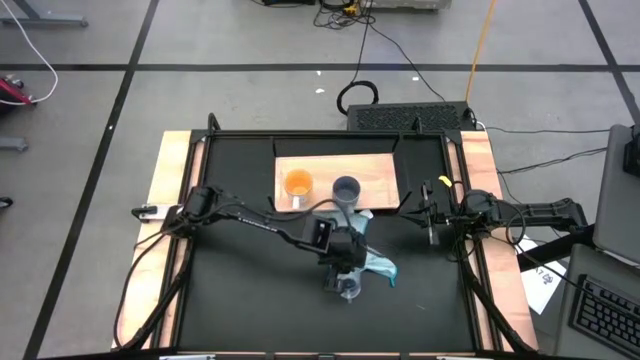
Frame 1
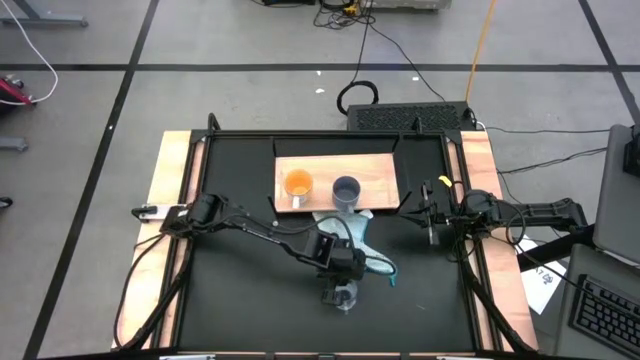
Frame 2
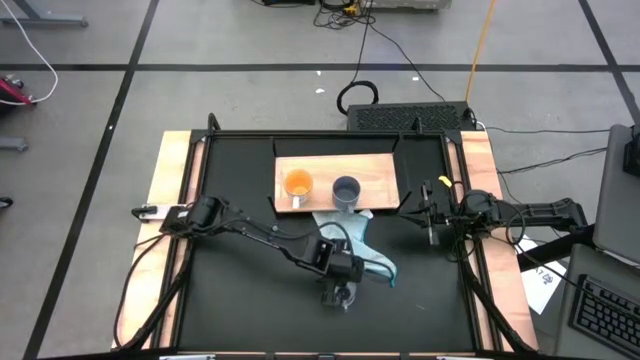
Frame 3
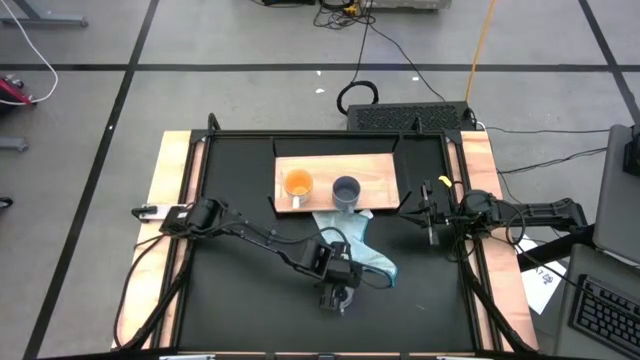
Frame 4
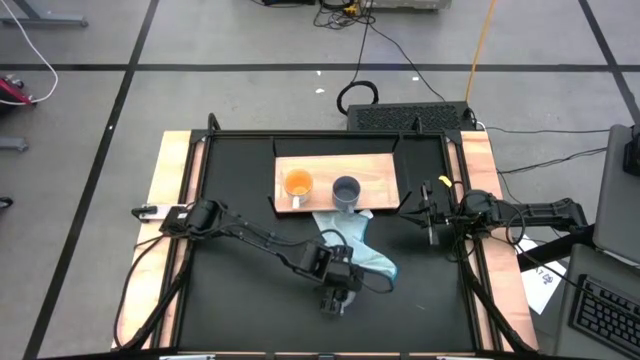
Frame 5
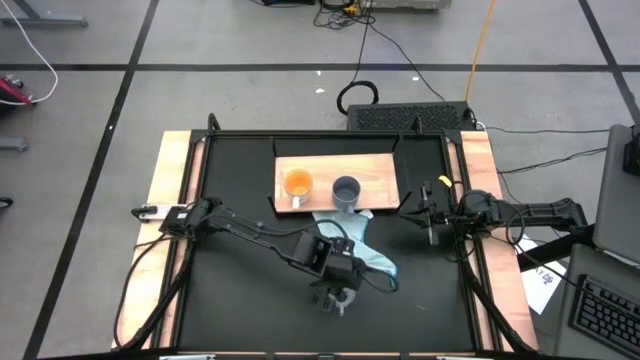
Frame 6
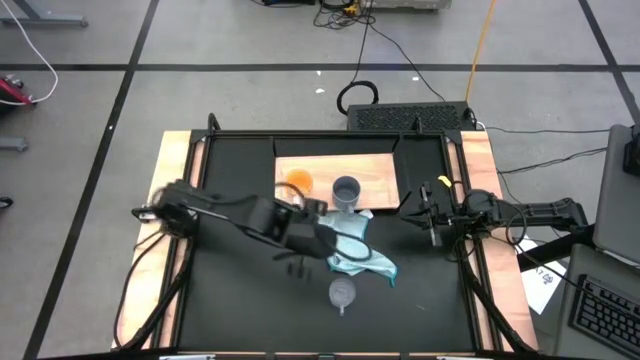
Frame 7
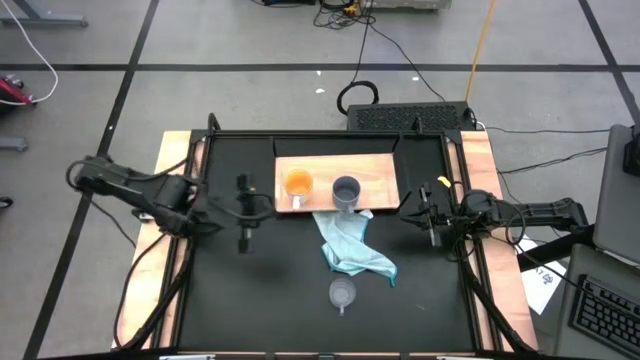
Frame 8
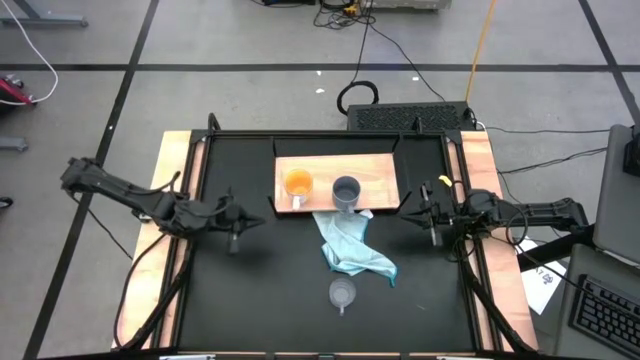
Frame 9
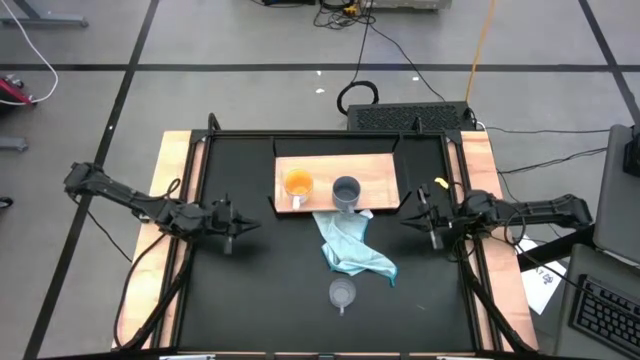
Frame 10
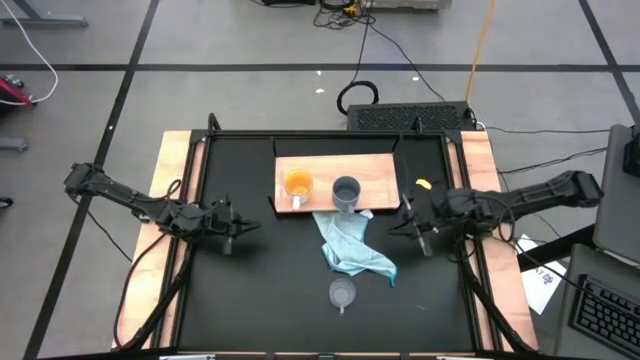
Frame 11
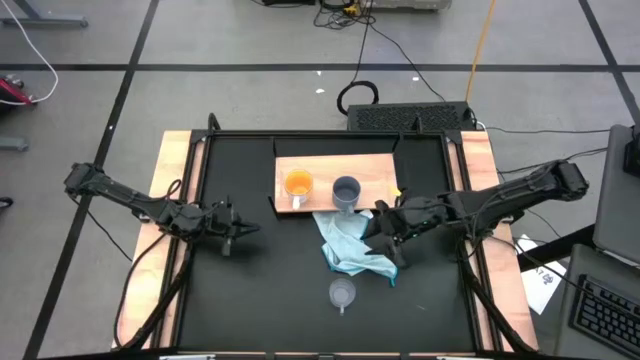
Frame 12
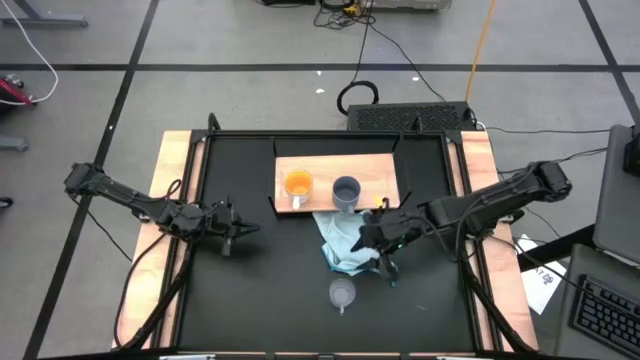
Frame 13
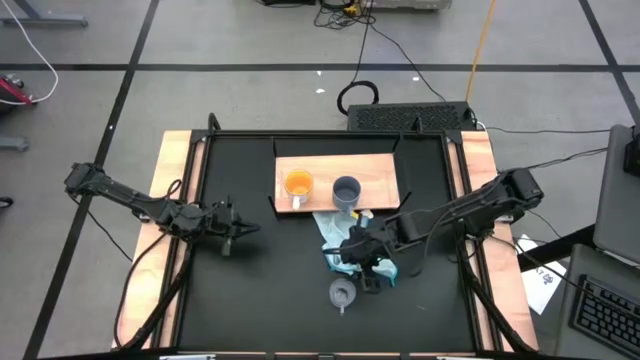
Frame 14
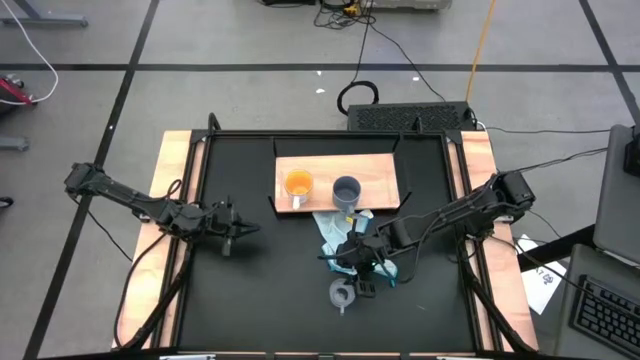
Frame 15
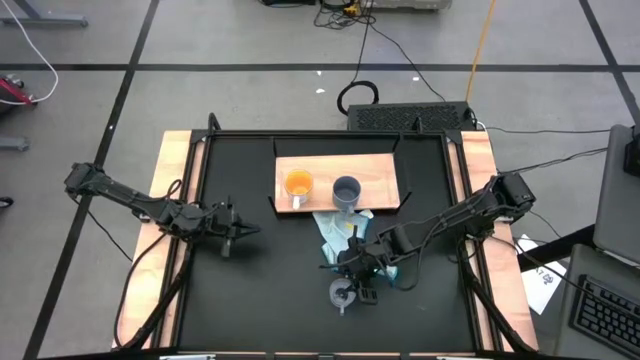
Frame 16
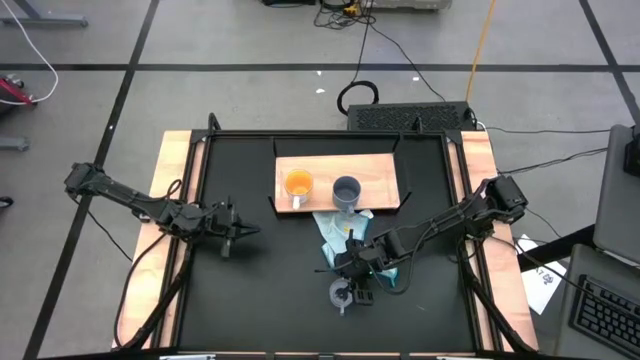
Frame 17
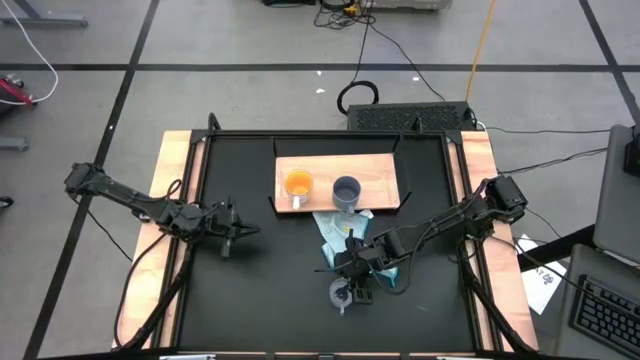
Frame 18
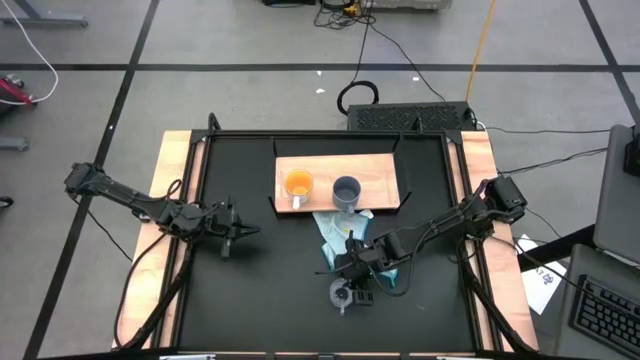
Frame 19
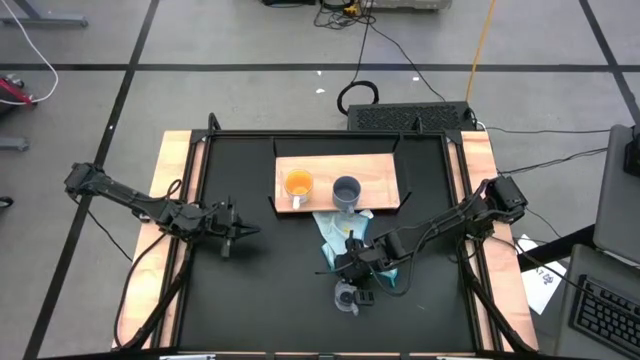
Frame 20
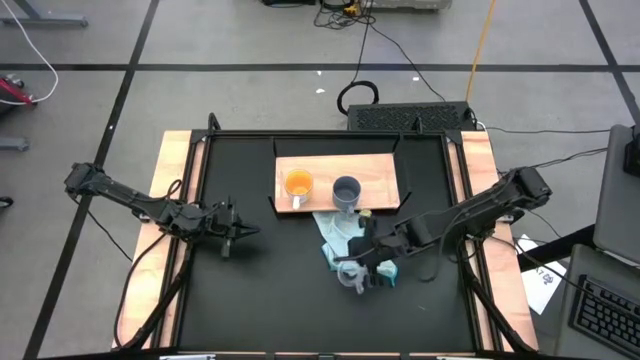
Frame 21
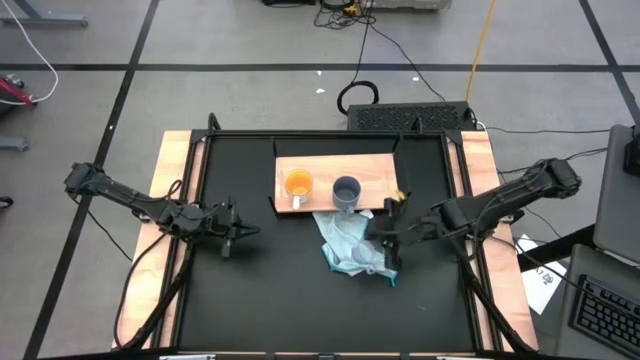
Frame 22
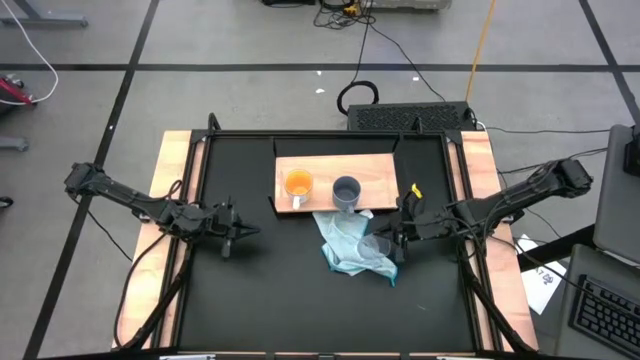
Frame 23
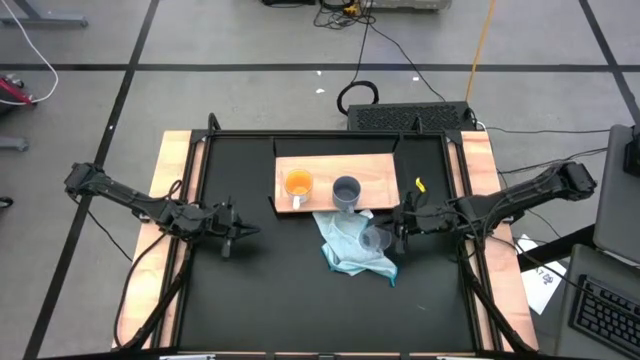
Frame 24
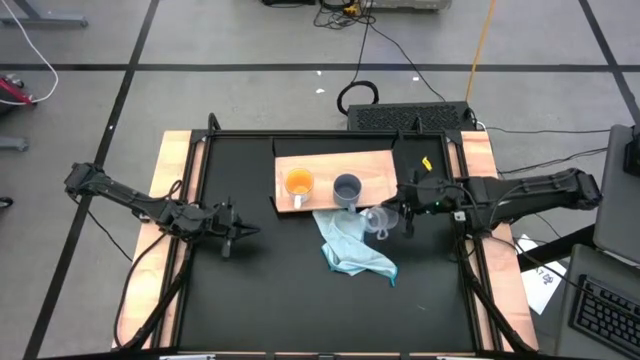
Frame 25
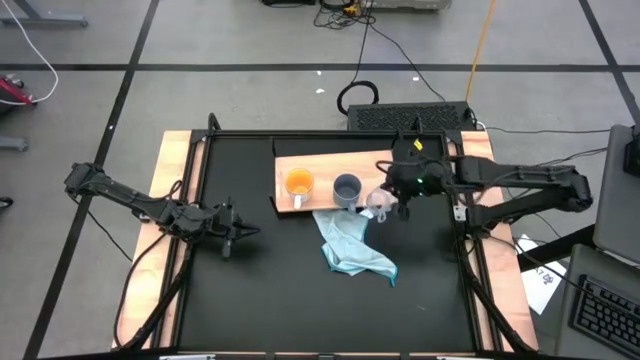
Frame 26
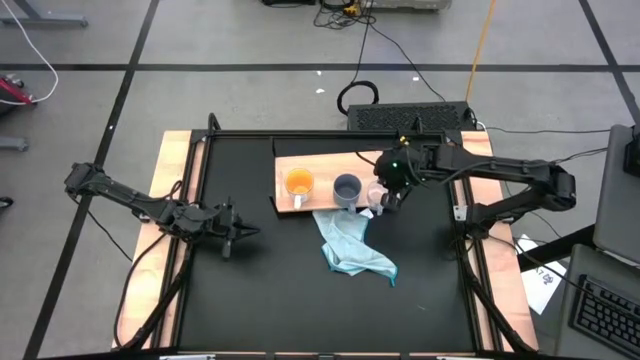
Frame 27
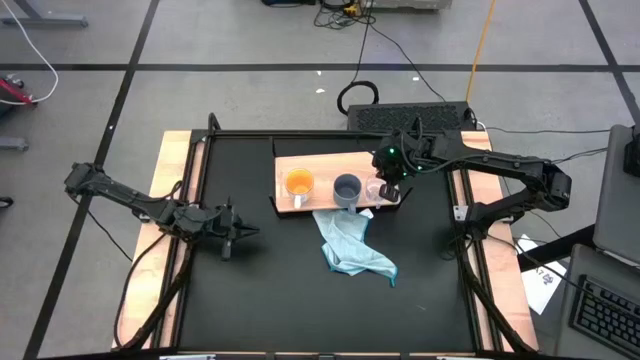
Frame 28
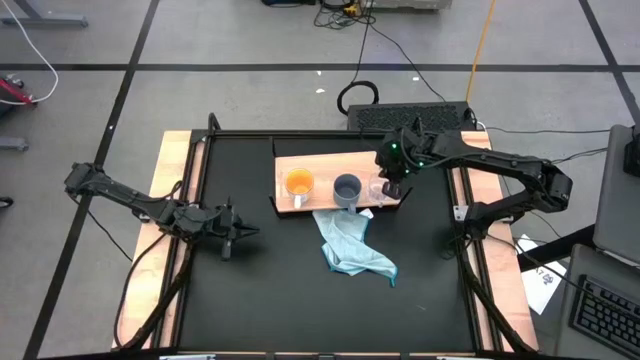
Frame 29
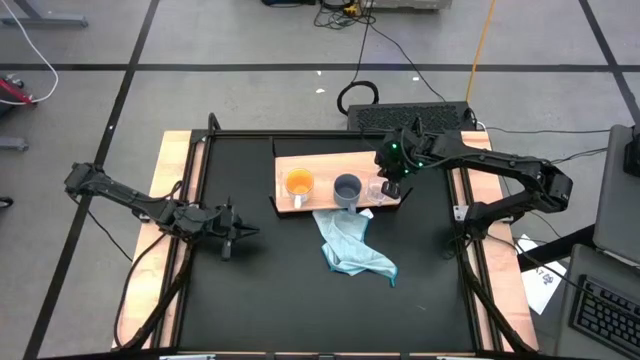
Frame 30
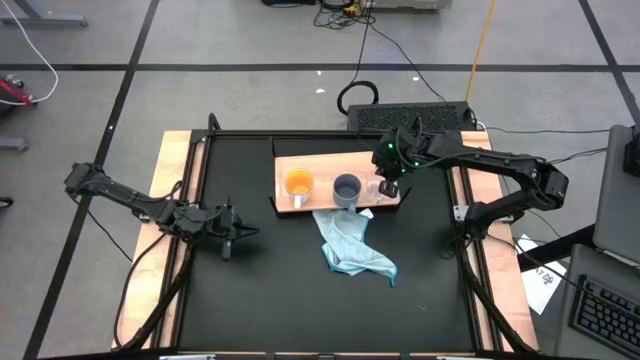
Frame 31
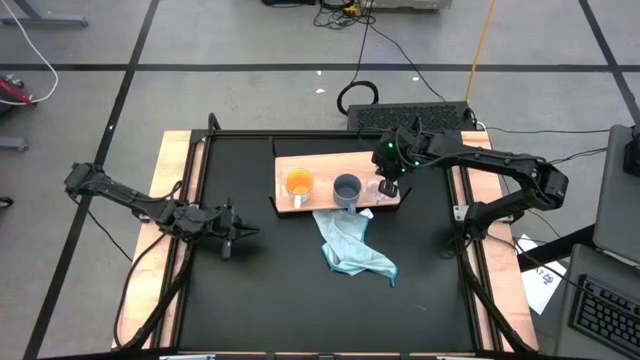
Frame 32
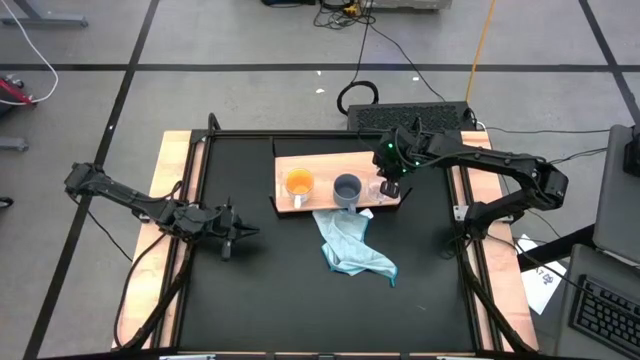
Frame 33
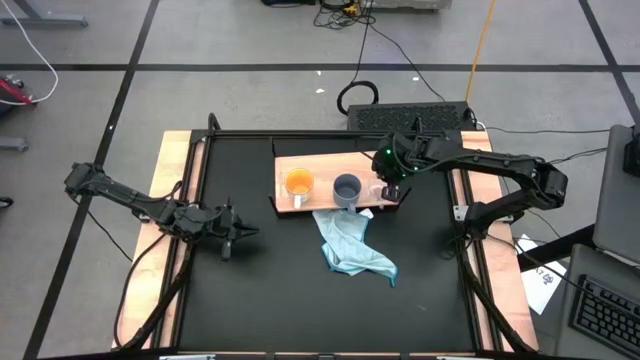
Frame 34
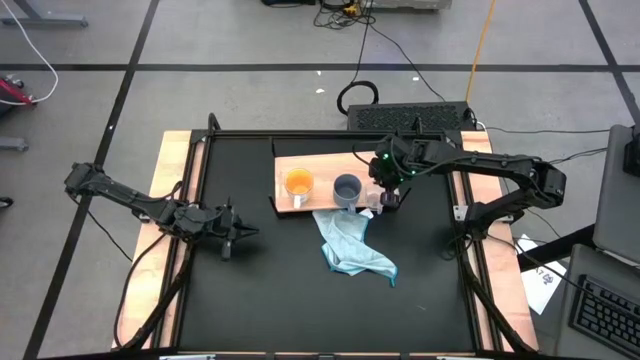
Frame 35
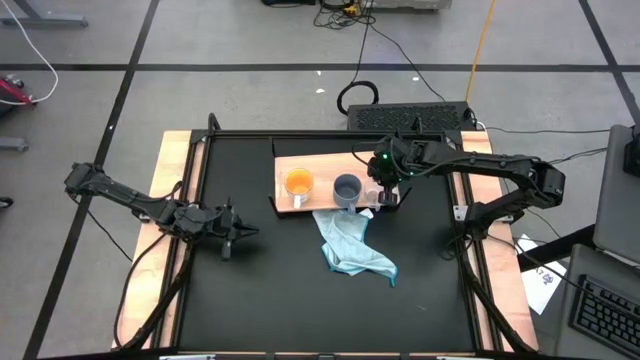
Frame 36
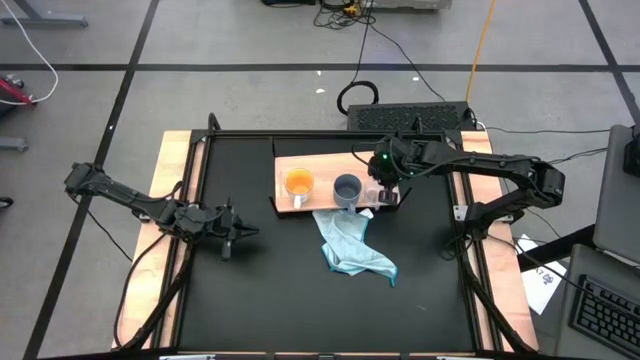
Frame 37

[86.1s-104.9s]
Task: Stack small to large cups/mugs on shelf
Put the transparent mug on the shelf

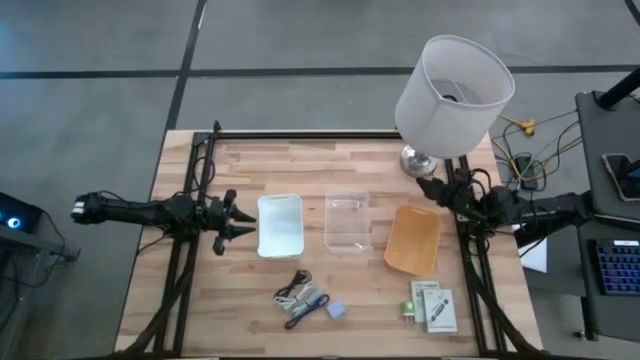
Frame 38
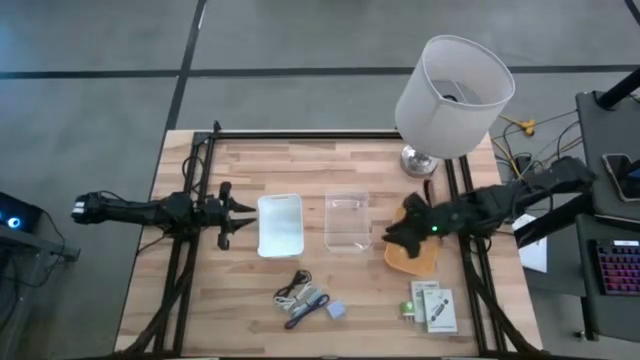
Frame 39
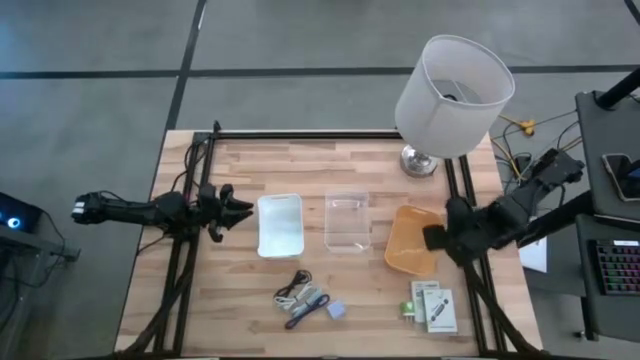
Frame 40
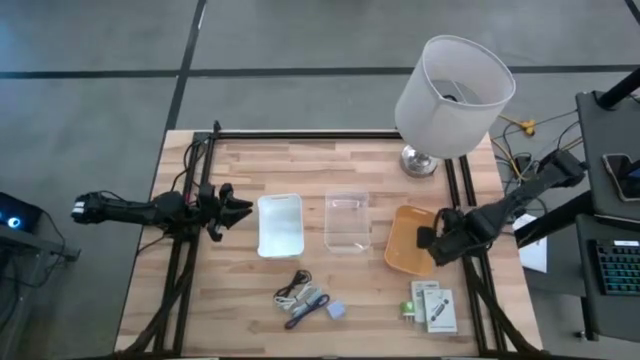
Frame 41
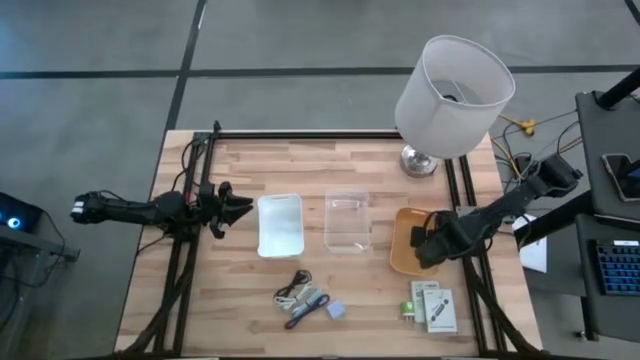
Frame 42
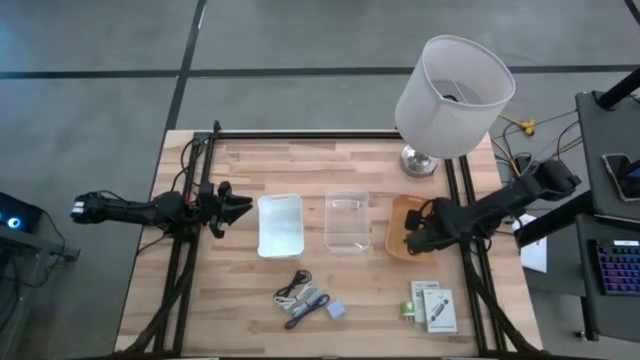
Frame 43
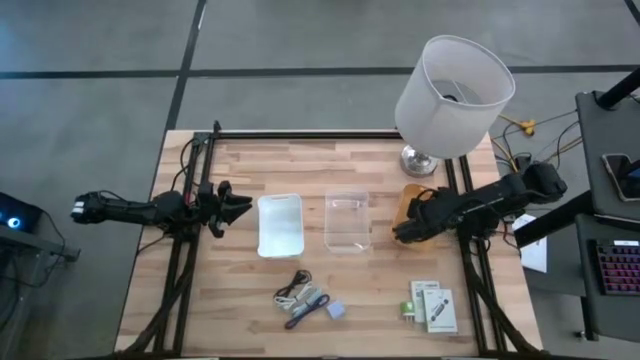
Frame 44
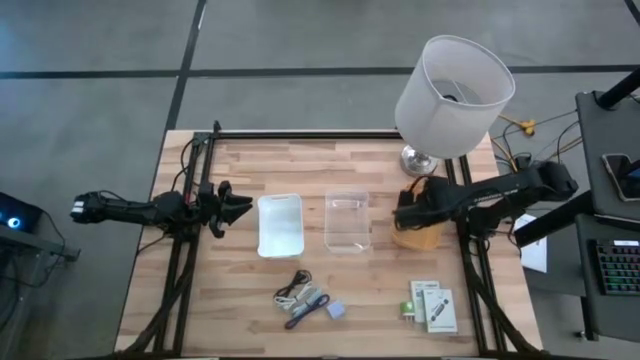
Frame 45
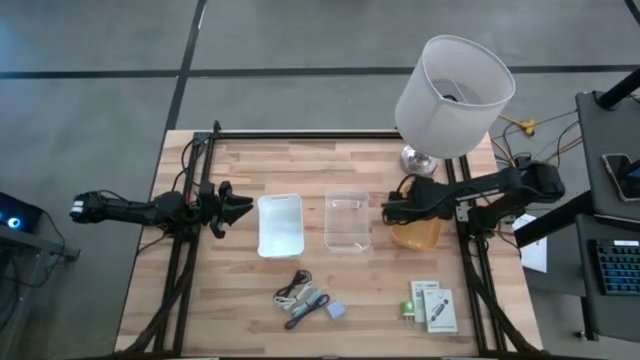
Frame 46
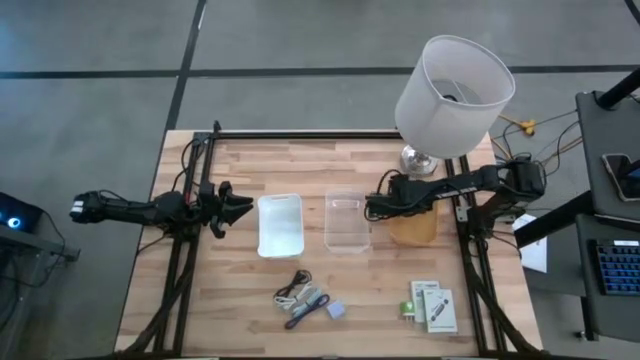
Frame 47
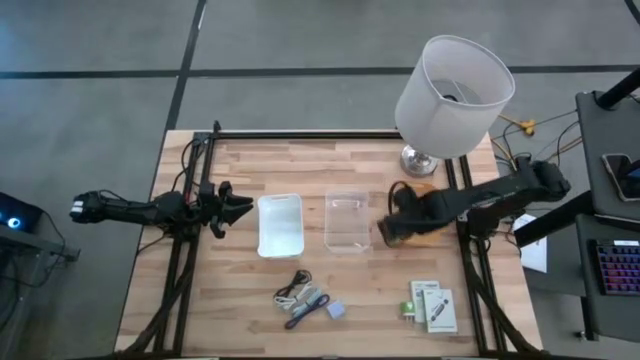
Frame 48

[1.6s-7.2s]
Task: Pick and place items into bin
Adjust the yellow bin
